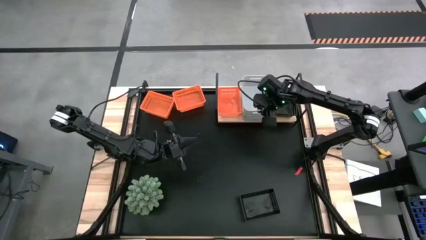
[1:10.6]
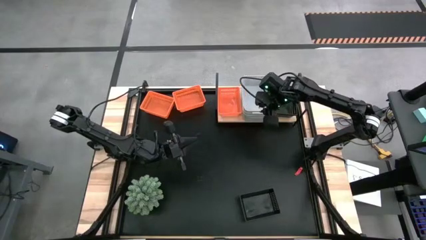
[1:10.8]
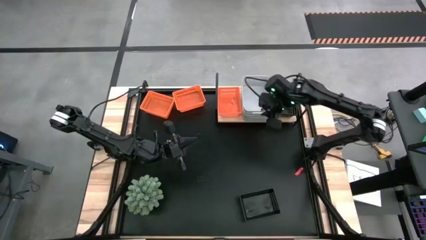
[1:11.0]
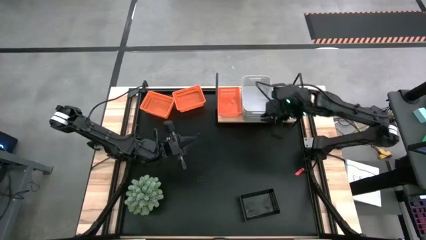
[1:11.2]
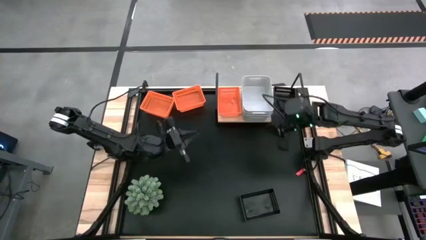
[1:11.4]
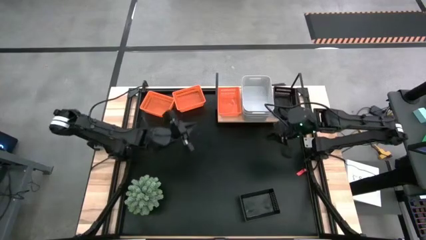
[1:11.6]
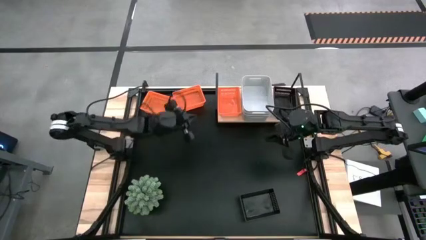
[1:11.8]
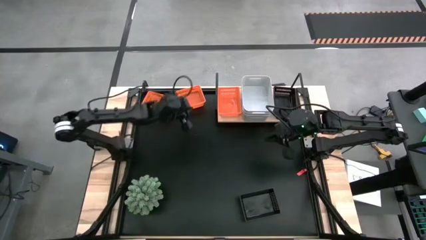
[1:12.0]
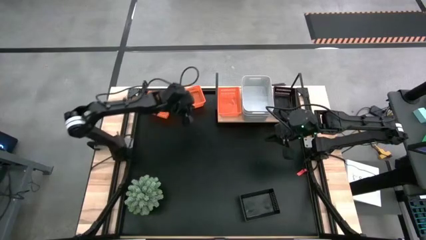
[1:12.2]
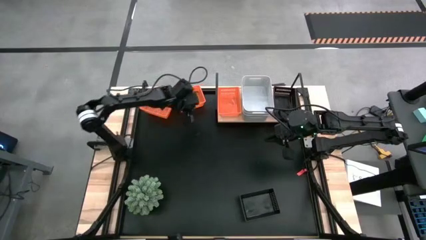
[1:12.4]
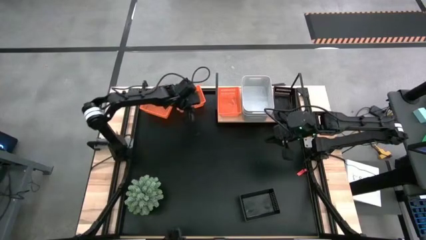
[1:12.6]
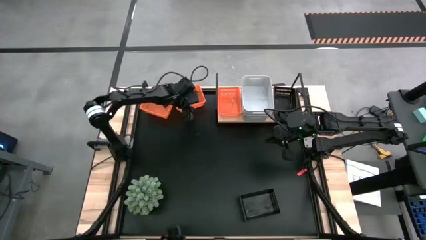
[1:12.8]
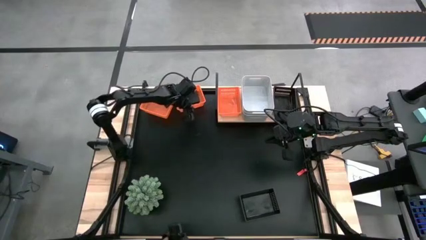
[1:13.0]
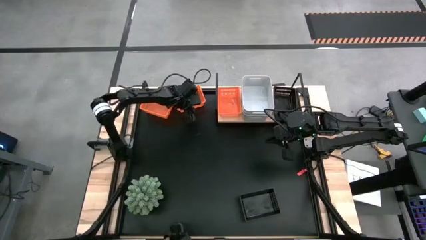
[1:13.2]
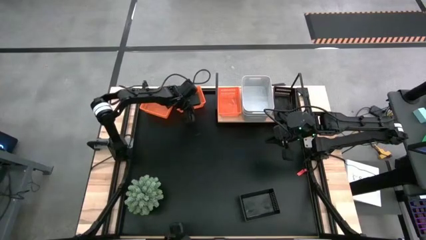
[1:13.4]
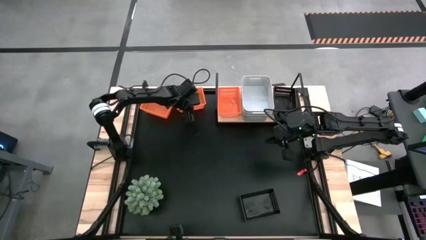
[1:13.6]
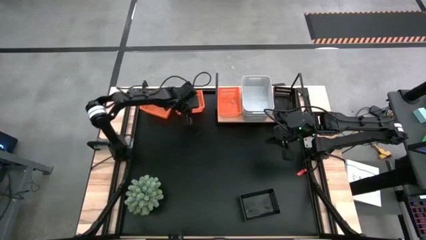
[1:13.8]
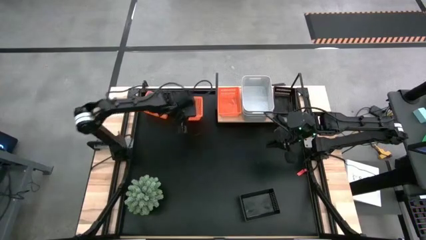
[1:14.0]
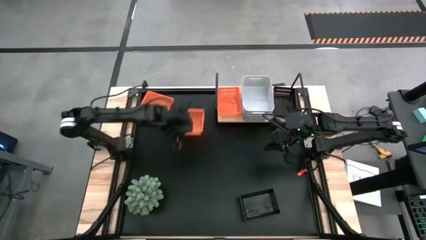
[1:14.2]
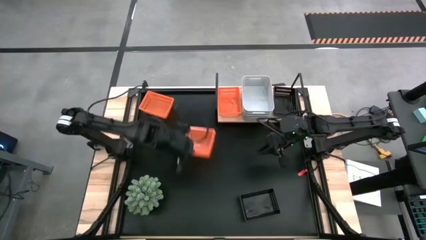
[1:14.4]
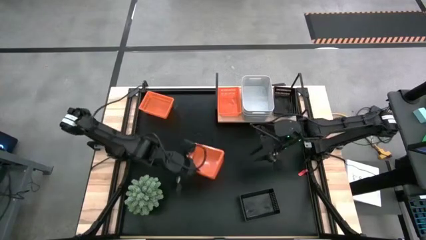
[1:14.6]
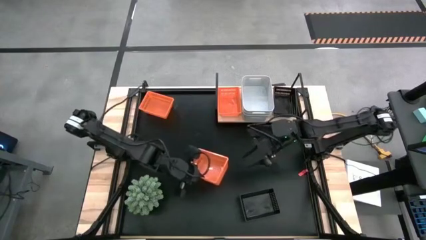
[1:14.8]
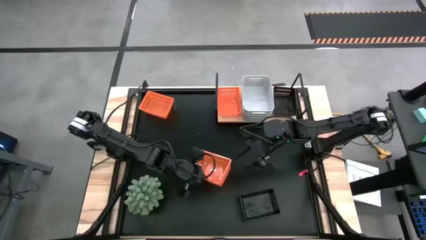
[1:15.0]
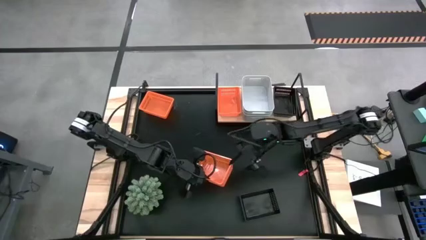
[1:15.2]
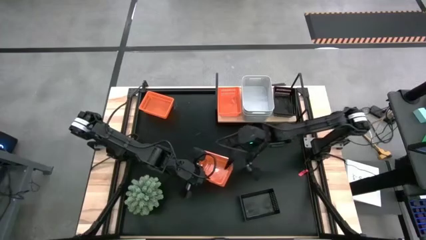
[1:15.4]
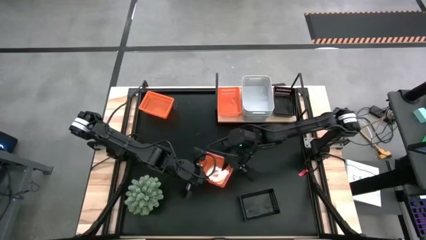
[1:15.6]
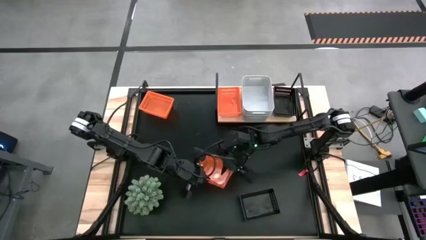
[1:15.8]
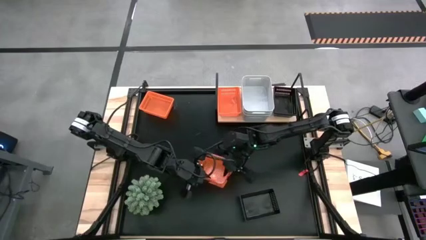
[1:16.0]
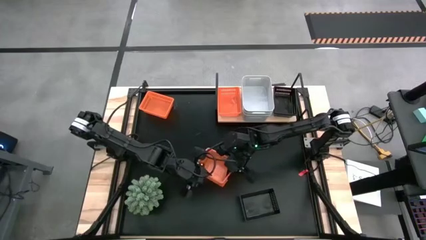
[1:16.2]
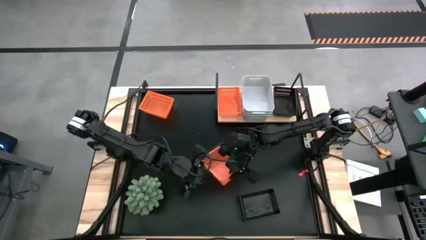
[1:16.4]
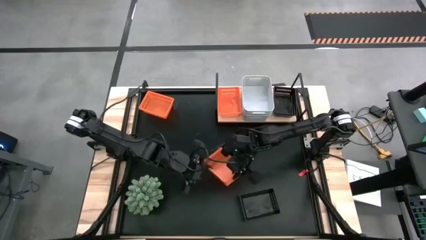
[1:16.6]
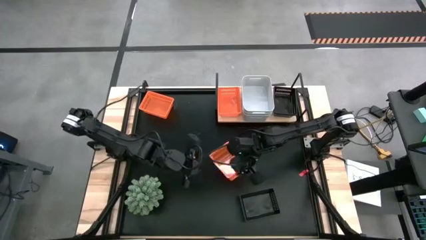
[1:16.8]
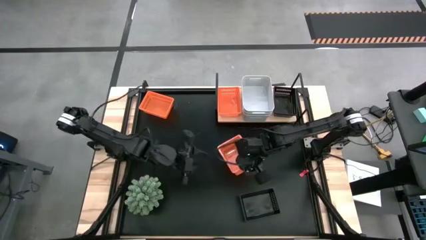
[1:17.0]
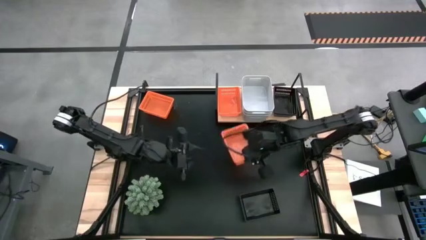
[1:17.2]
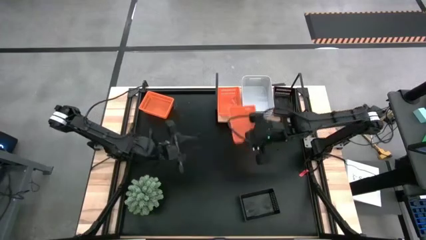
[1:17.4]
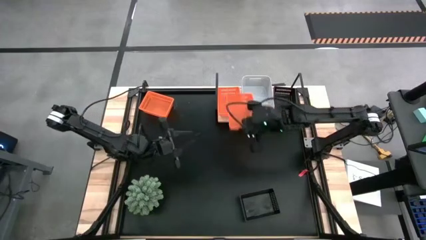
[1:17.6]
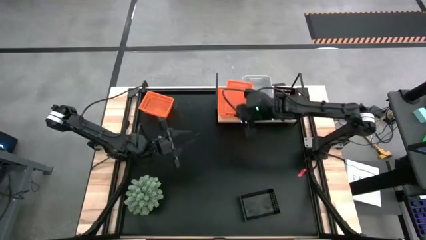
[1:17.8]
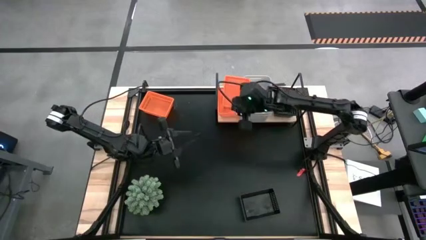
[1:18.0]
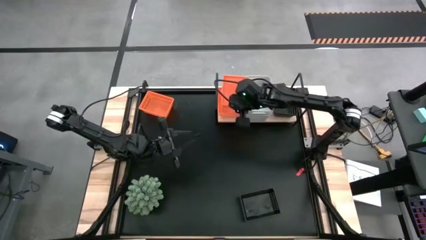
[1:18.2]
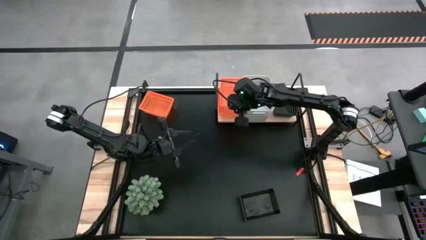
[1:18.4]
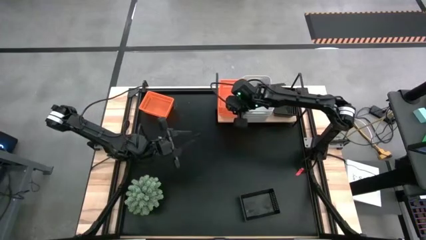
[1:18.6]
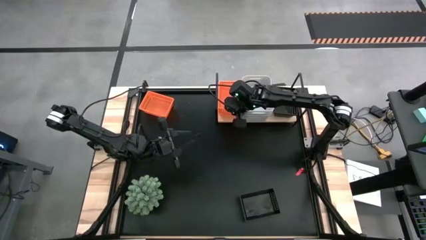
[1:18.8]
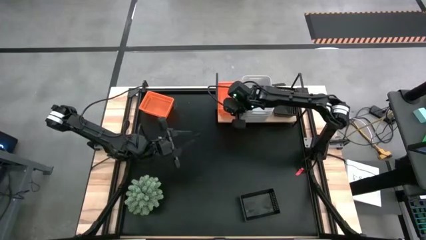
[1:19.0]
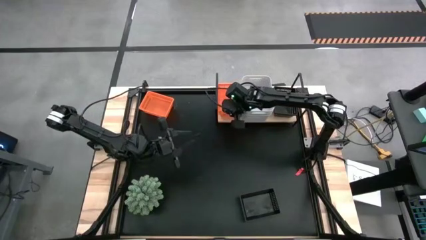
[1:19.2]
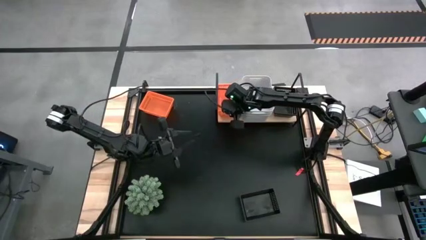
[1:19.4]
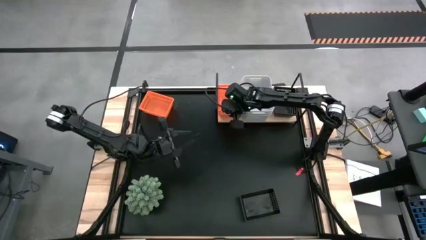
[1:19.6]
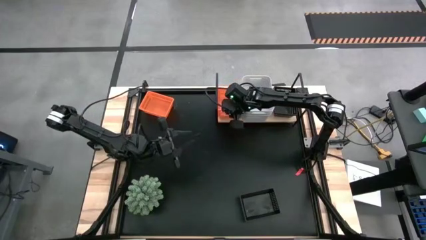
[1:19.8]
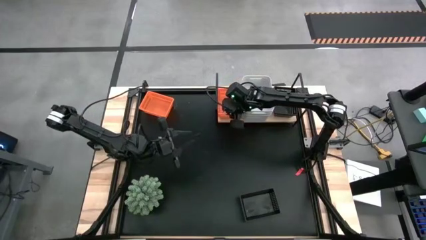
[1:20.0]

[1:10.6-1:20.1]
Task: Stack baskets on shelf by color
Stack the right orange bin on top of the orange bin on the shelf
